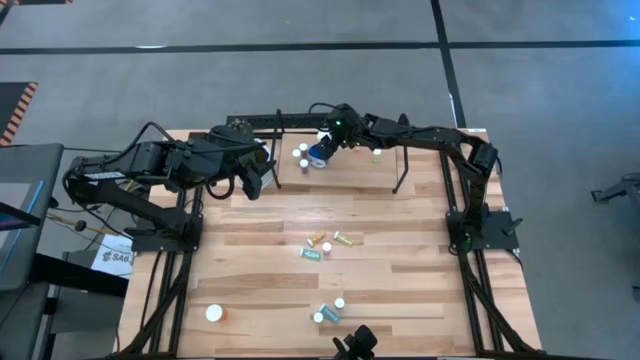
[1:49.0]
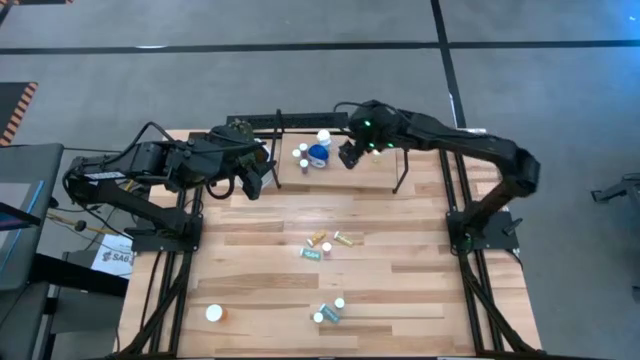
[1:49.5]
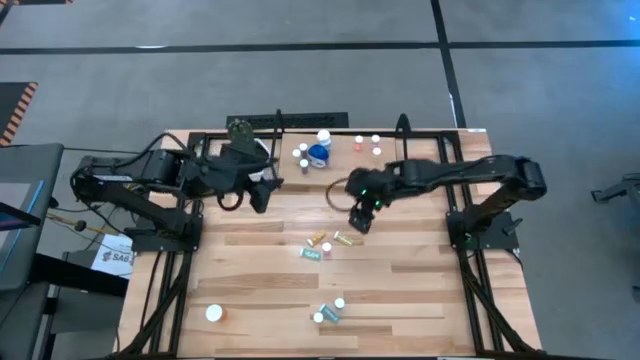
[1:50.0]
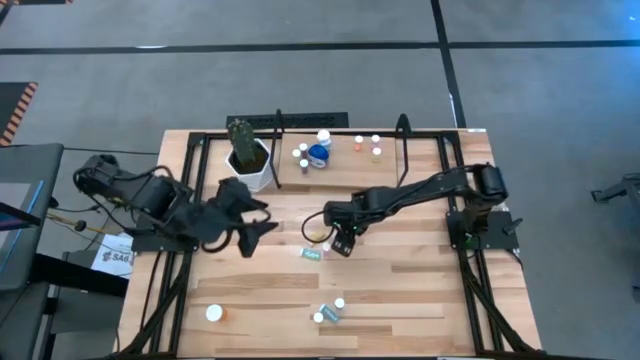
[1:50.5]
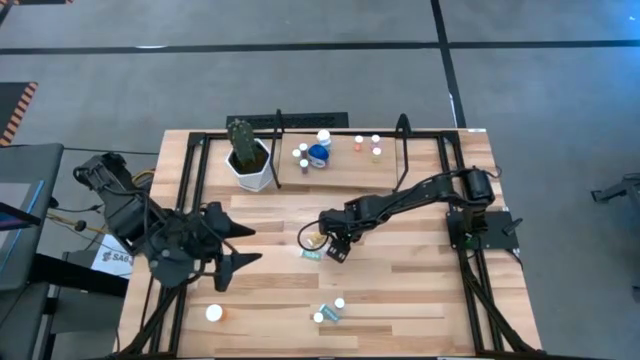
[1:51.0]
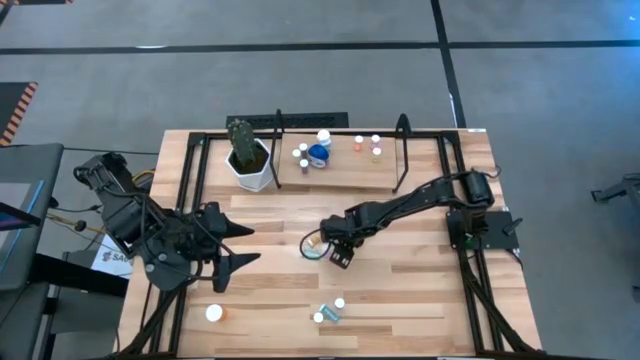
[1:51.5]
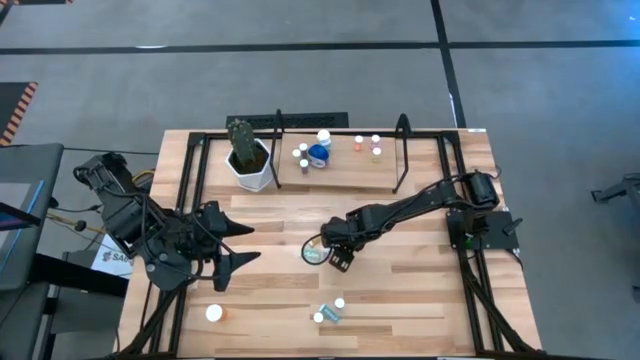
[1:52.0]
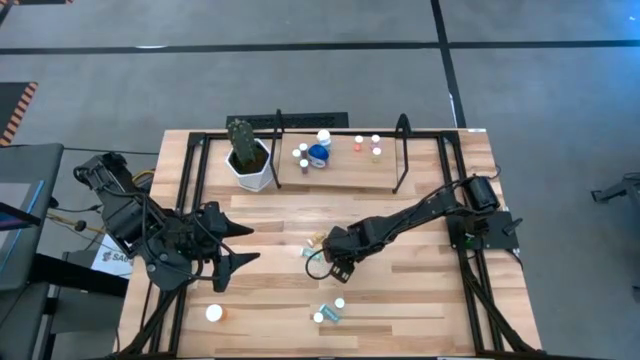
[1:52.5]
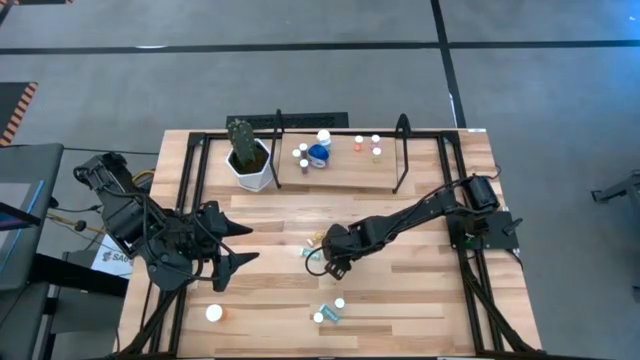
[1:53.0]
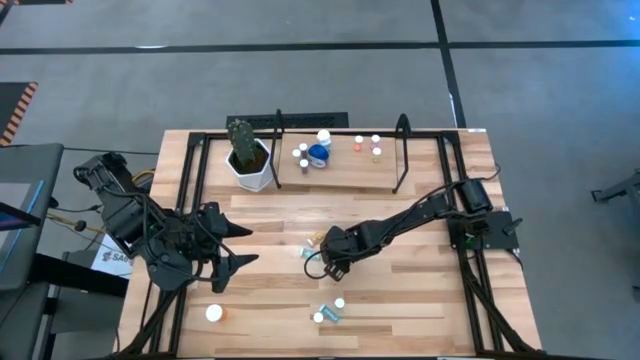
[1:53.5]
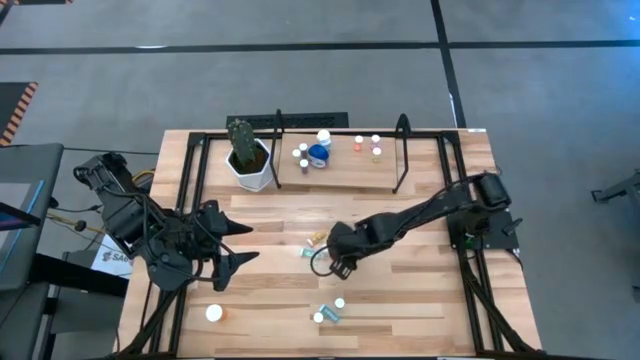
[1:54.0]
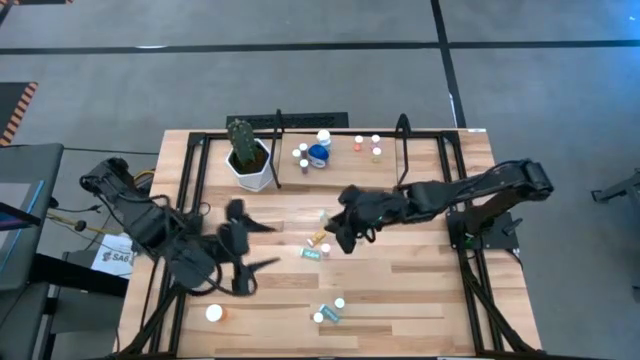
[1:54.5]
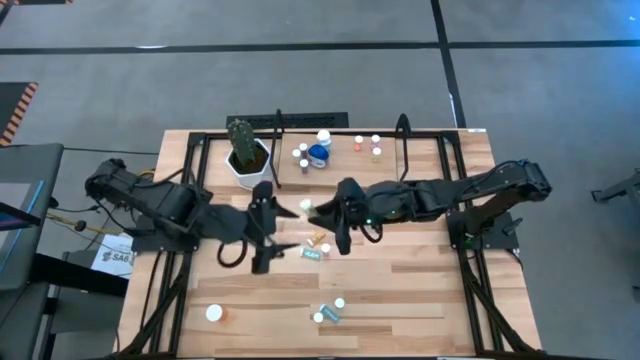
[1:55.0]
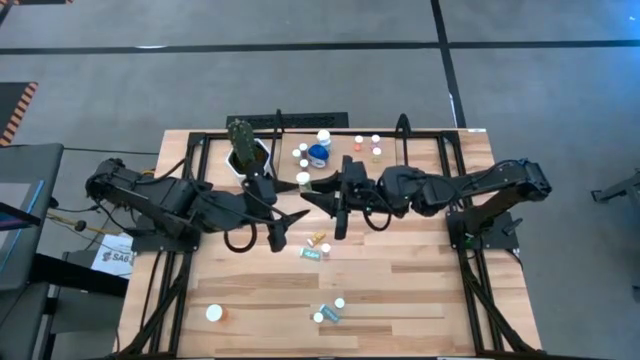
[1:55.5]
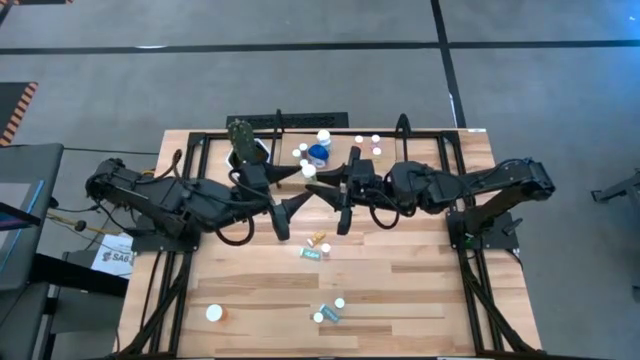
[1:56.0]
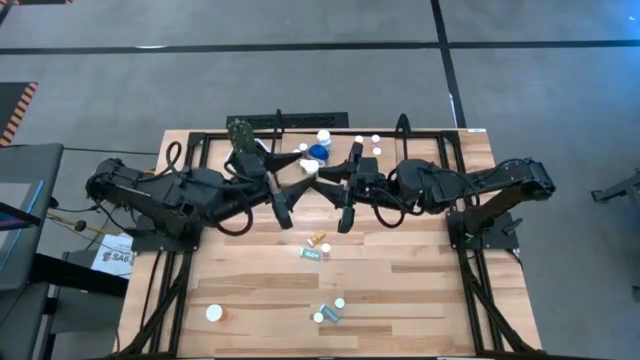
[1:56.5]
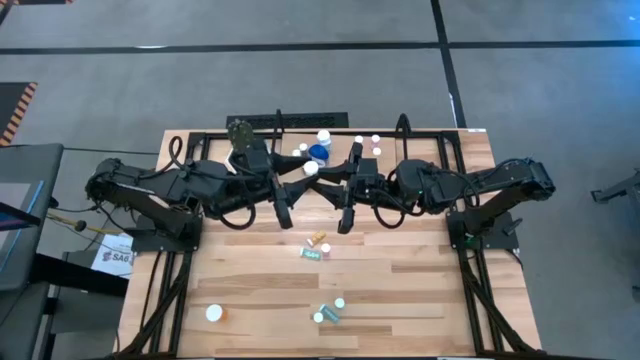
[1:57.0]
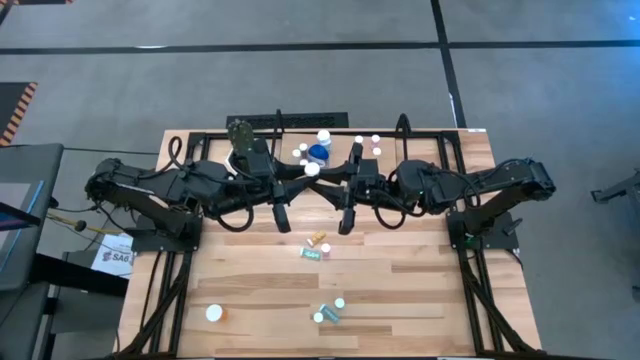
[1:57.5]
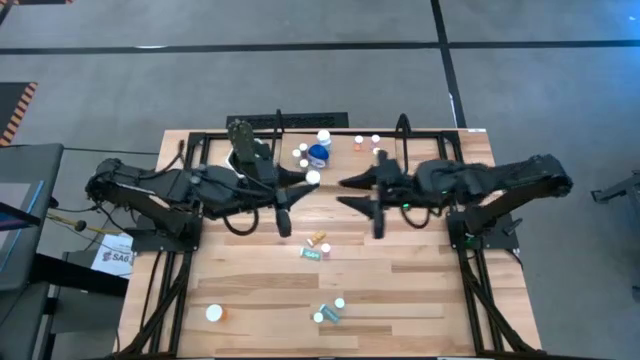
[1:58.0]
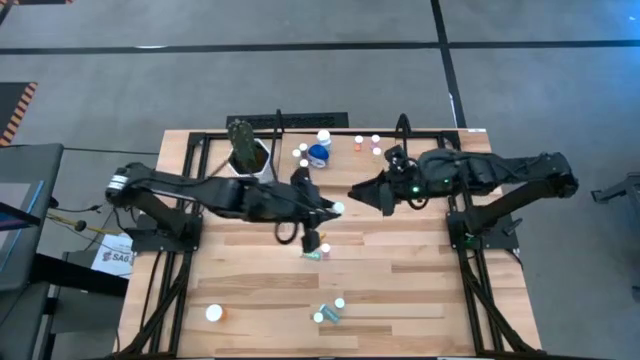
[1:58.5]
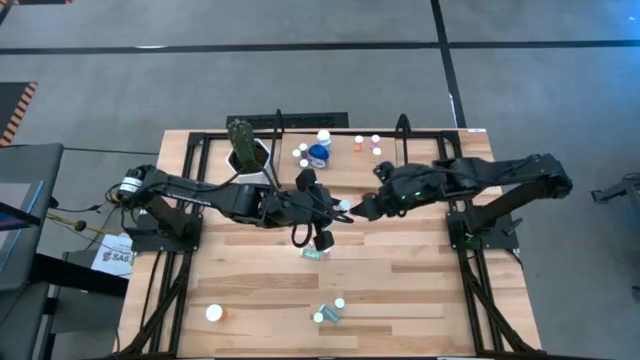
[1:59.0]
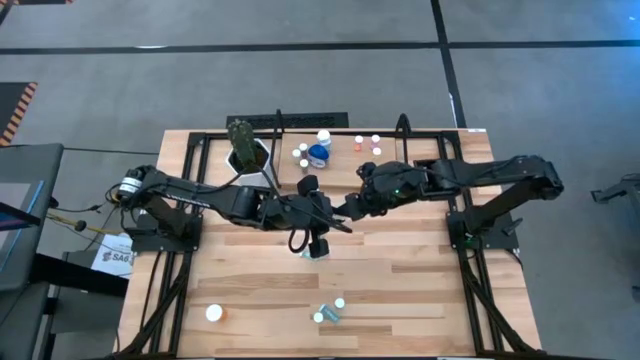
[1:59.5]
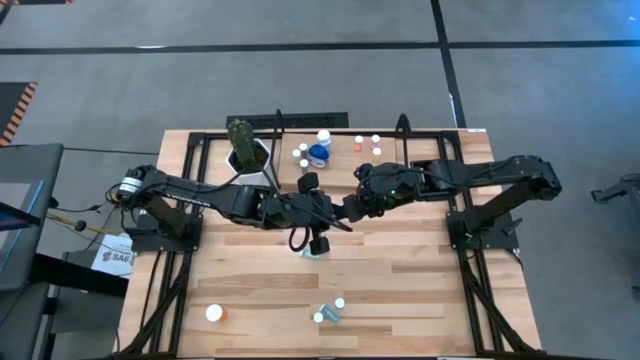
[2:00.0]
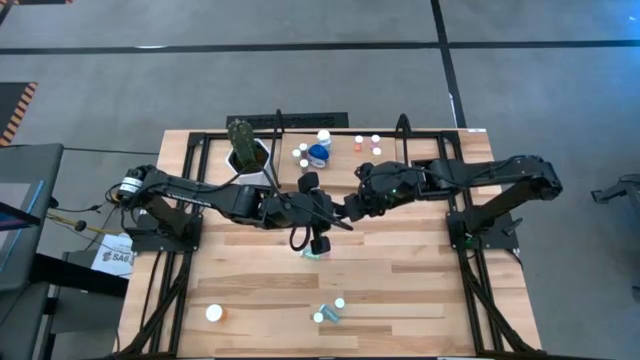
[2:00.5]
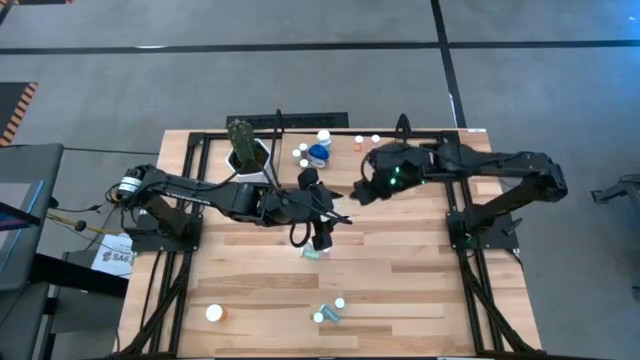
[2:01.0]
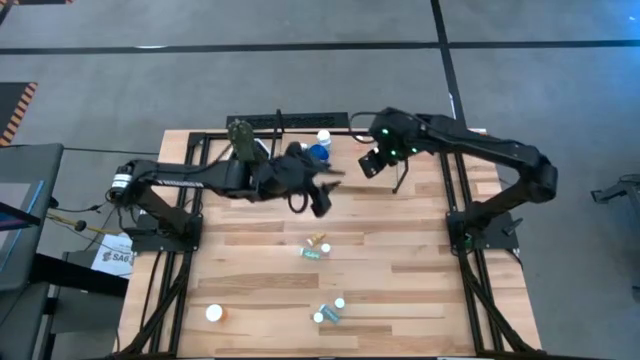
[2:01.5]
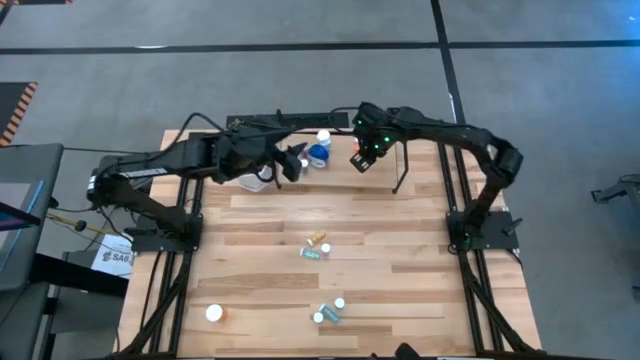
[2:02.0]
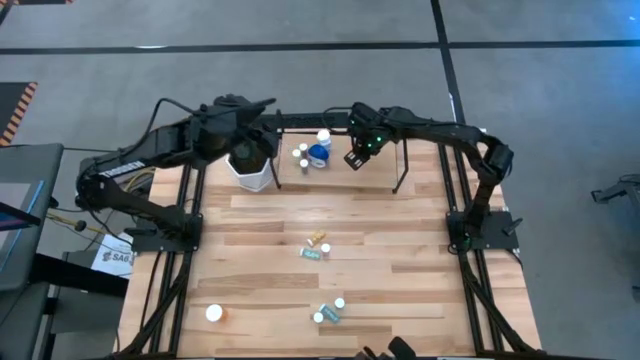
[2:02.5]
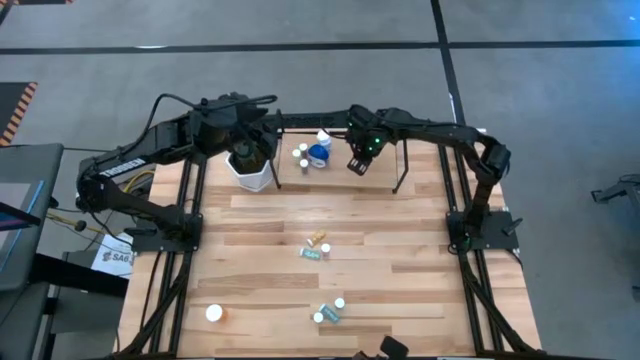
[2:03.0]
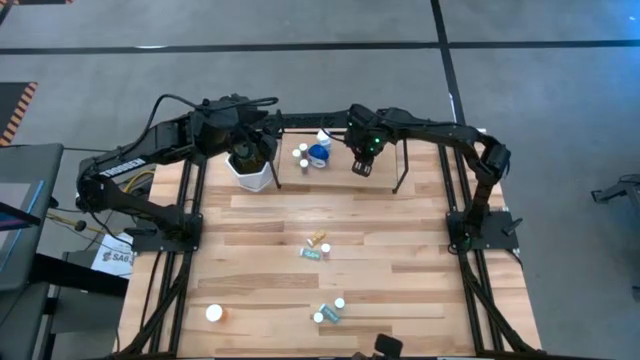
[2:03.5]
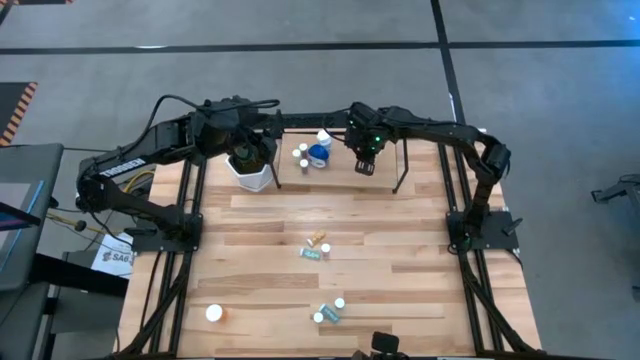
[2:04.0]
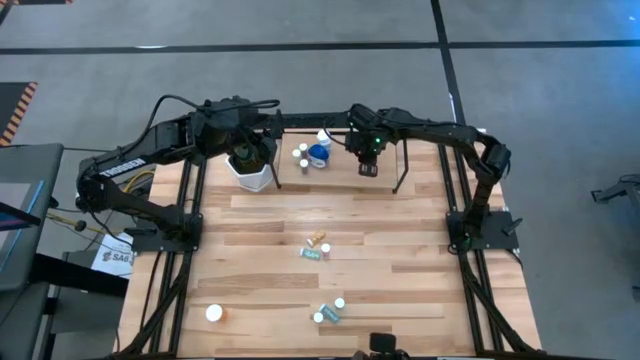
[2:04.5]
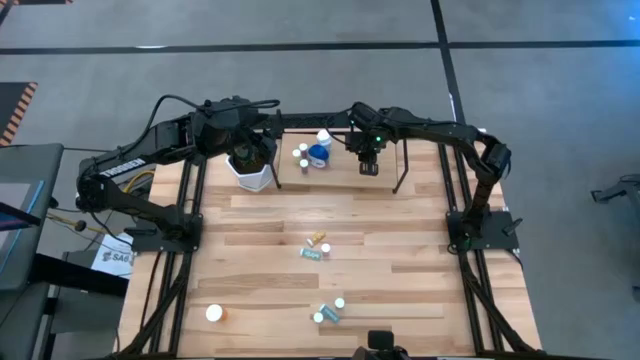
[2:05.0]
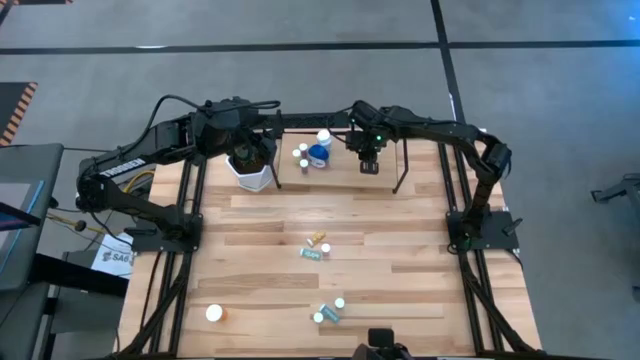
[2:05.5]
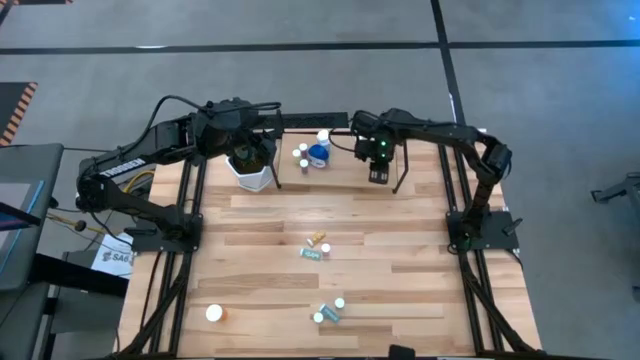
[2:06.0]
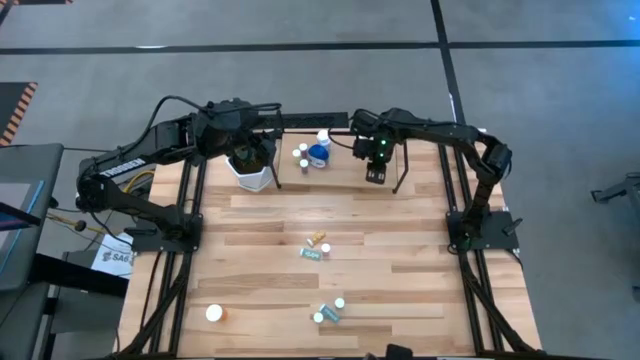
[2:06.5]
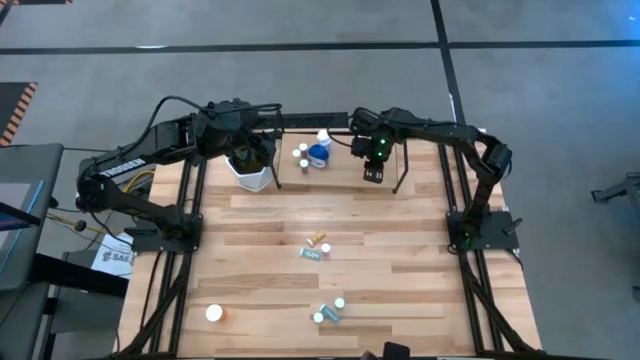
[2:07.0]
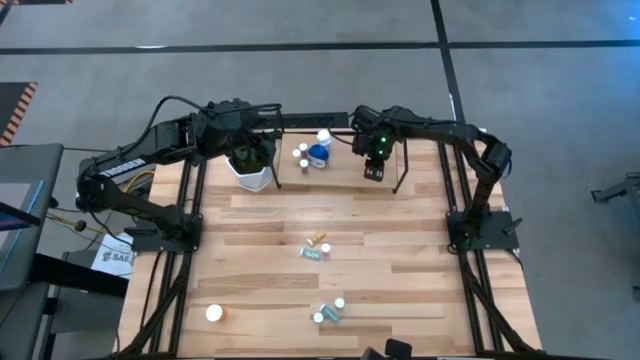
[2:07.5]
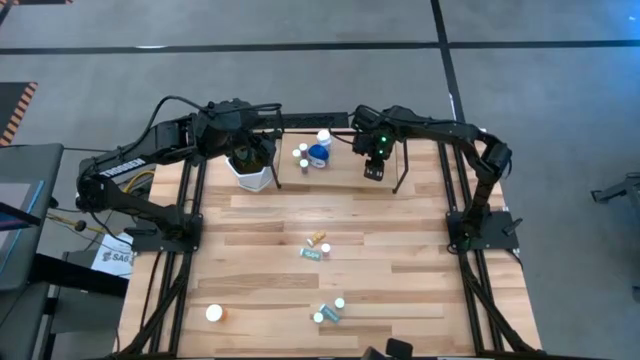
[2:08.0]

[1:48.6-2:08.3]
Task: Pick and place medicine bottles onto shelf by color
Put the yellow pill bottle on the shelf

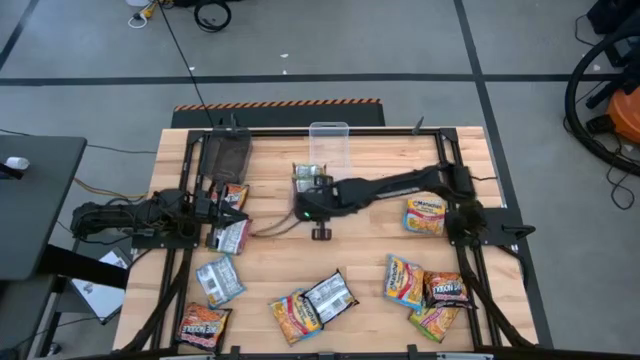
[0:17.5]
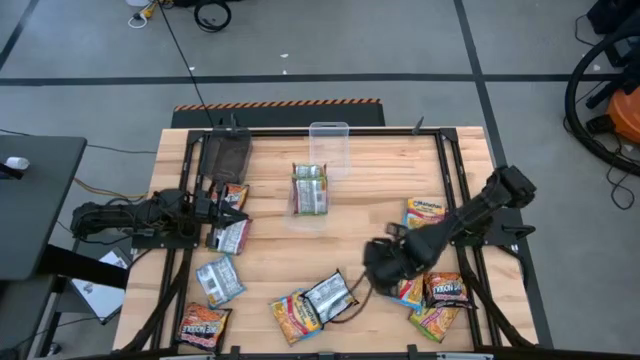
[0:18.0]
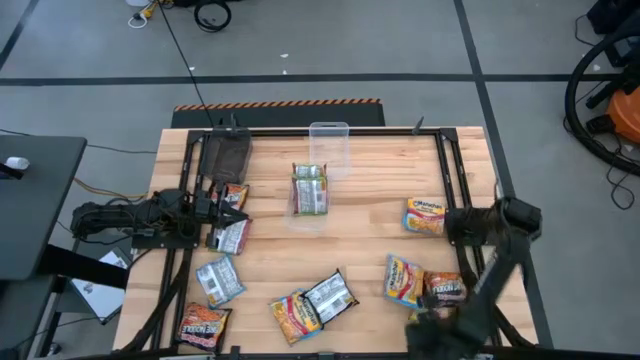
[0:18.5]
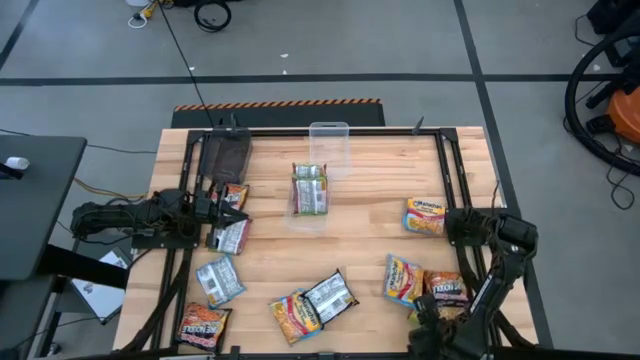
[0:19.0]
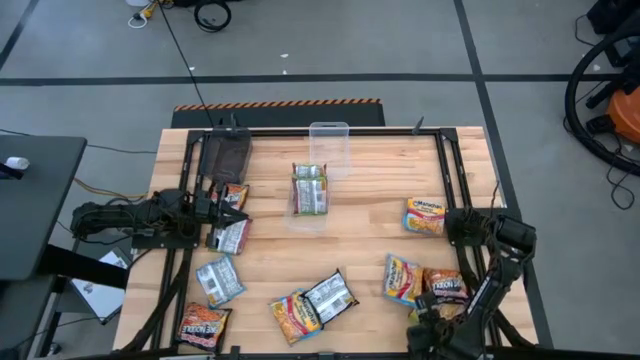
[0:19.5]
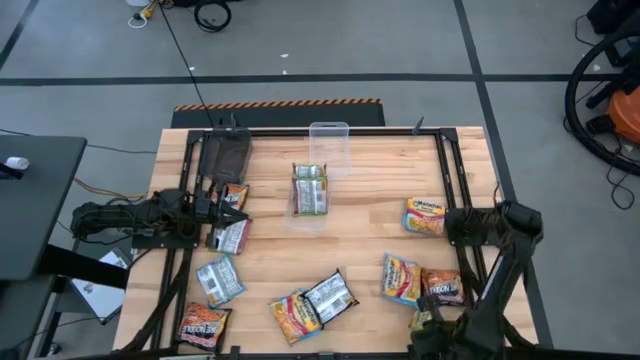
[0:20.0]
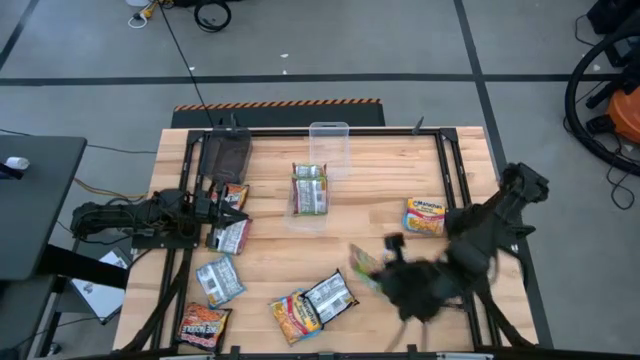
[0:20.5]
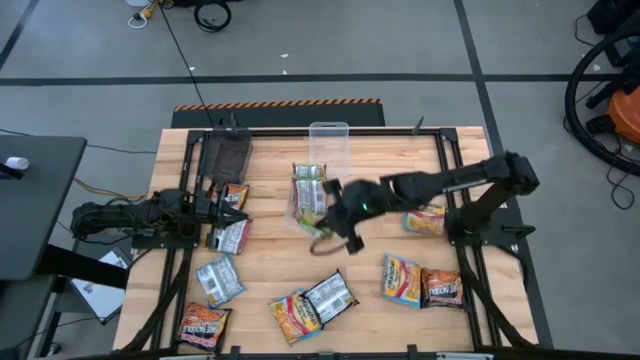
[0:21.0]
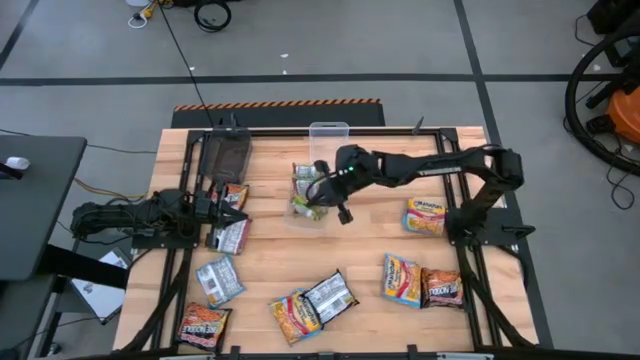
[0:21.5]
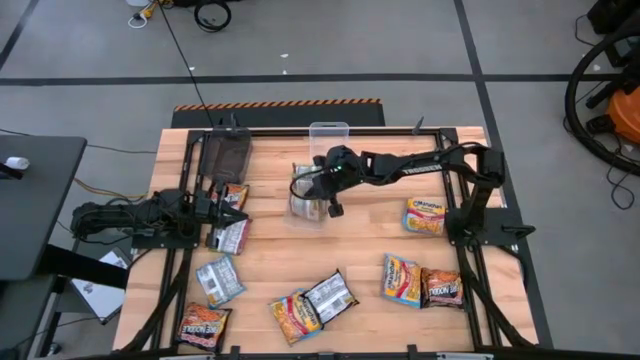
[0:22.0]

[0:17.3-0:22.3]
Task: Sort Maruchan noodles
Put the green noodle pack into the bottom transparent bin
